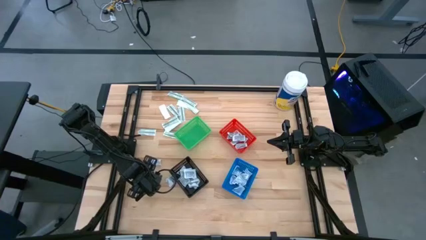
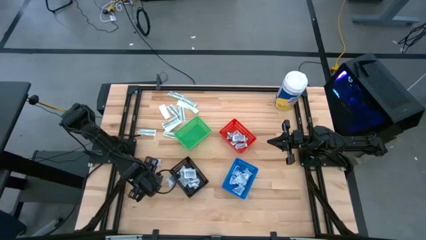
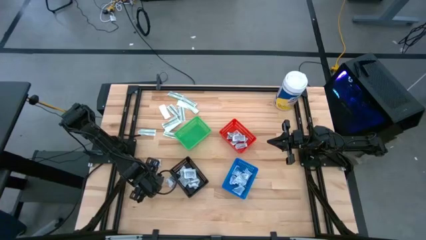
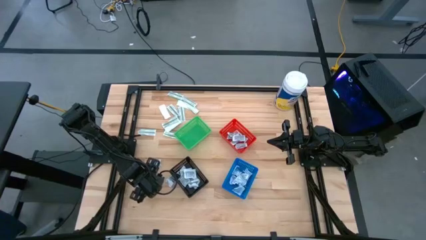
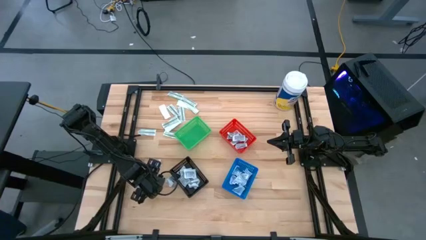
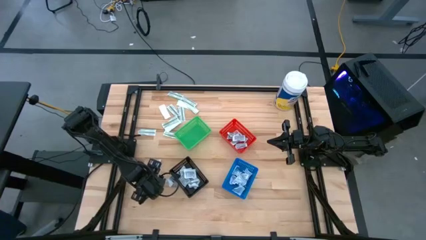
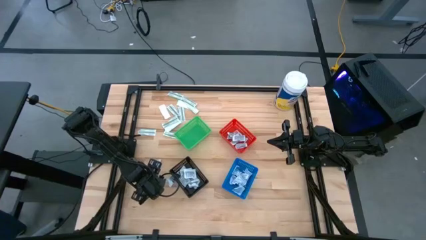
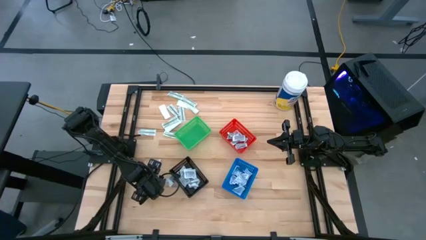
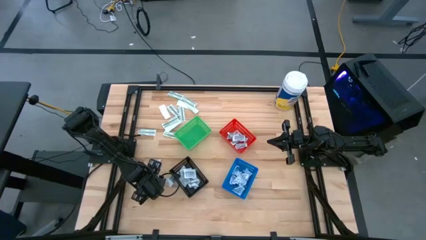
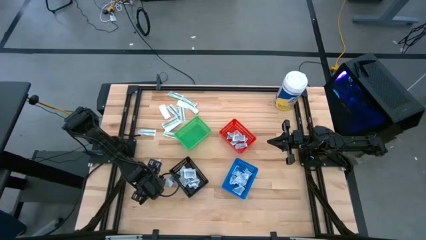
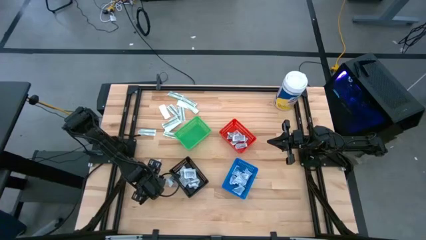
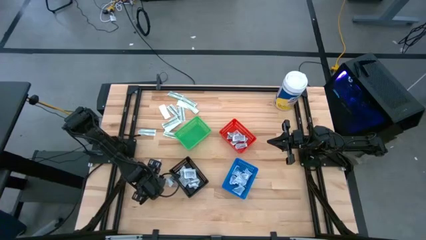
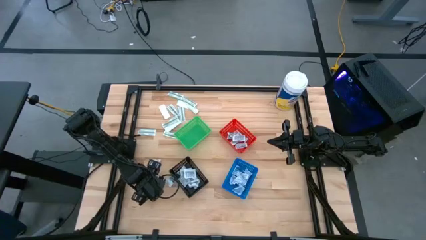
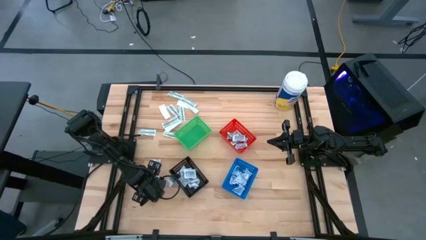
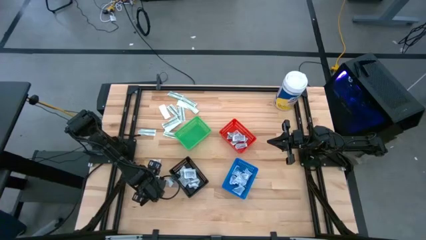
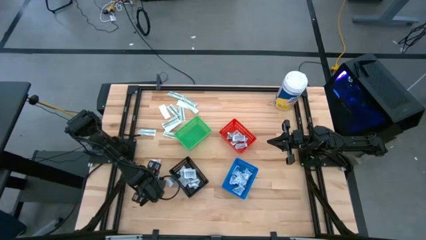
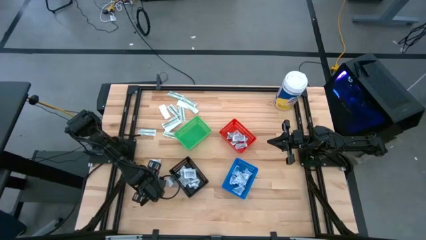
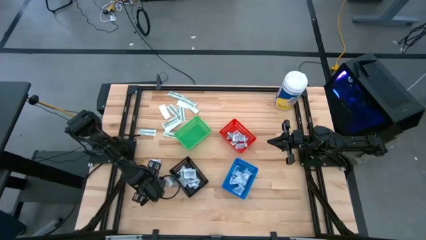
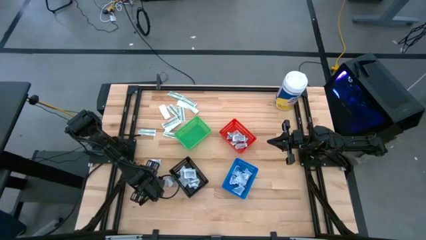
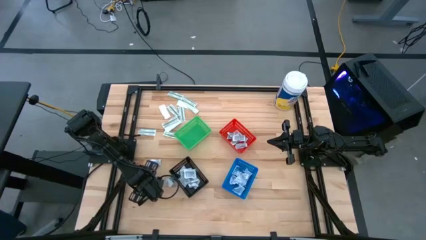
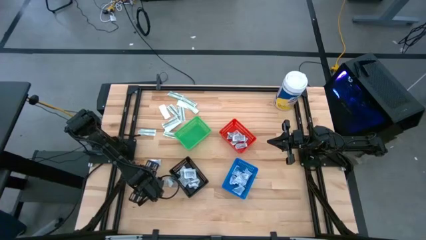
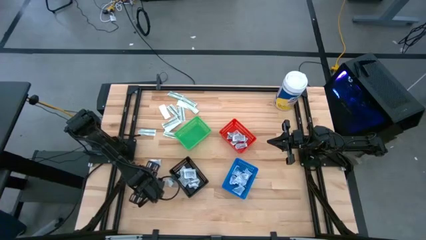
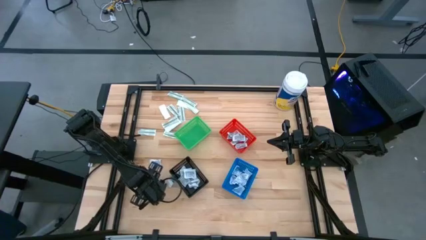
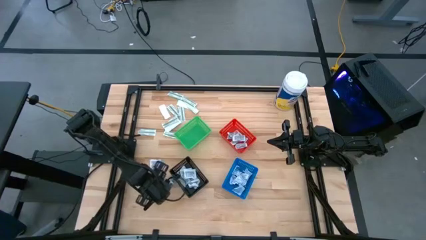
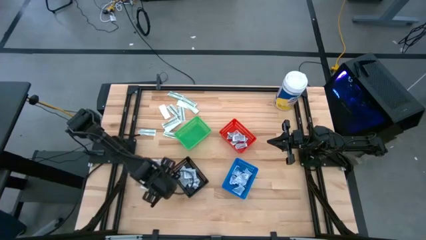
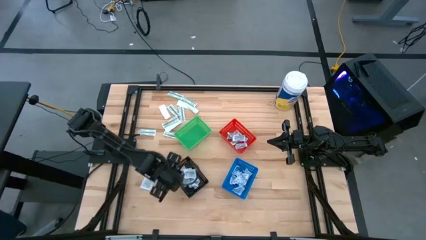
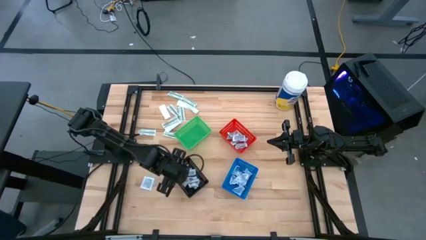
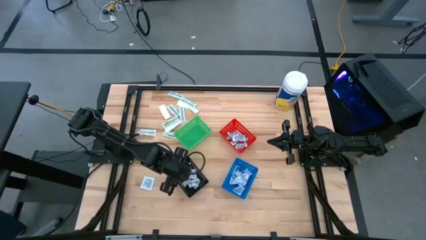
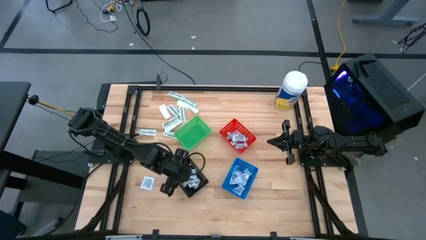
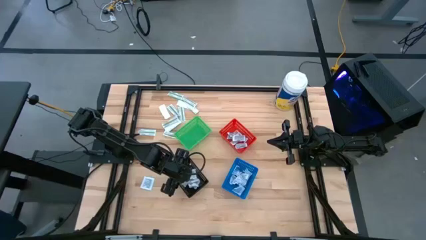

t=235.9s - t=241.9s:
Task: Pick & Place First Aid Supplies
Put the black towelette pack into the black bin

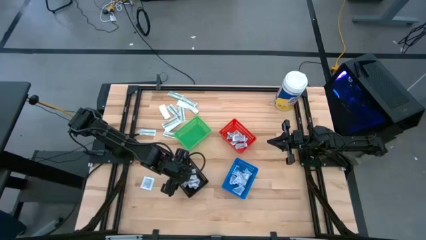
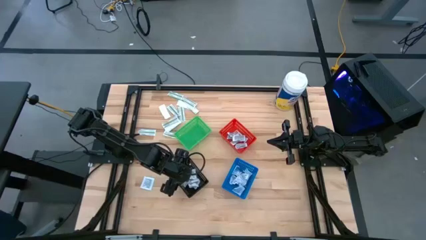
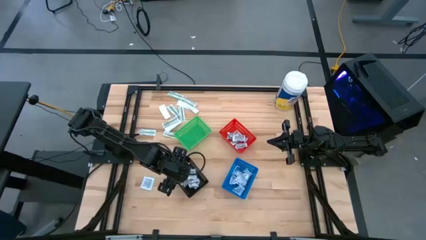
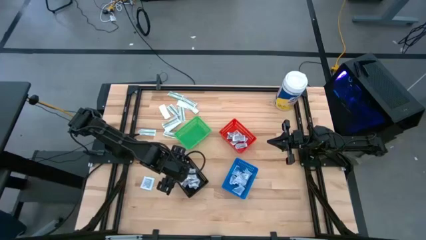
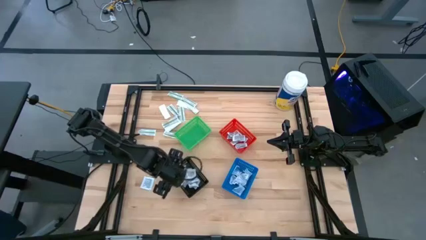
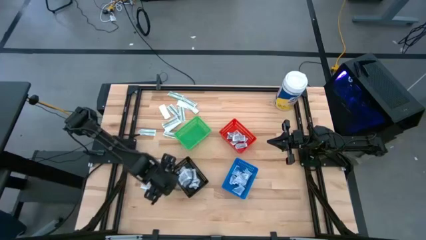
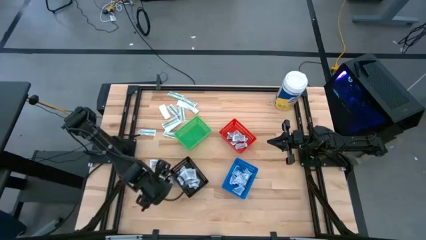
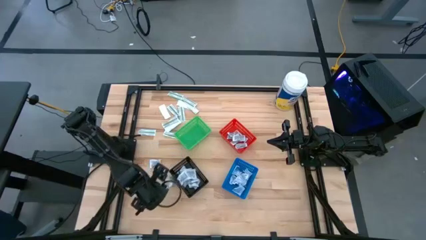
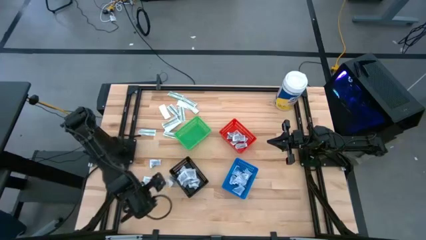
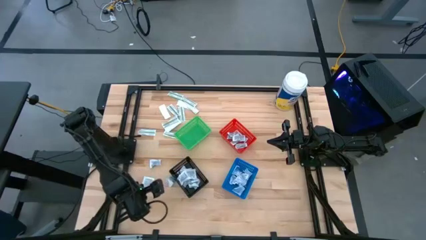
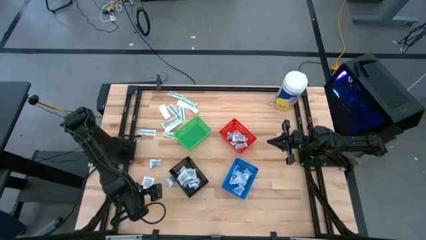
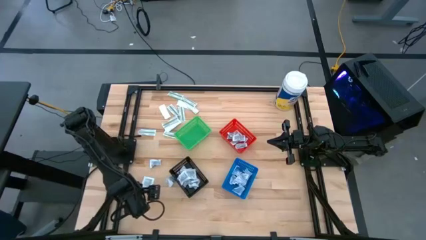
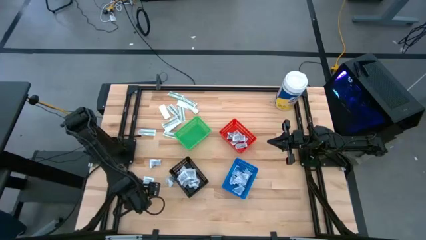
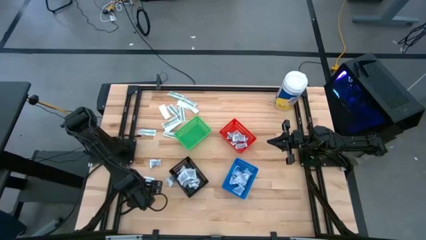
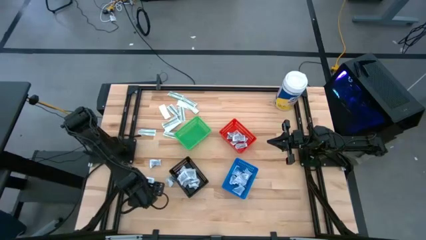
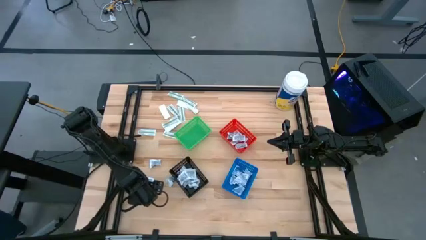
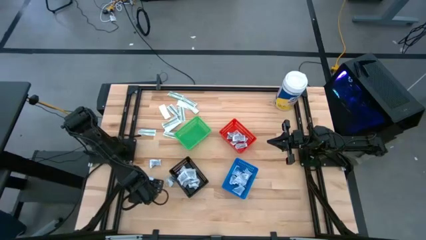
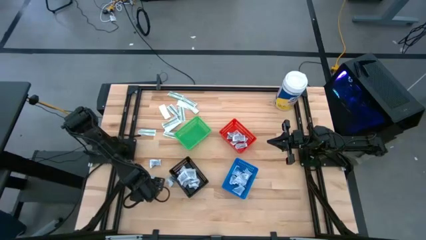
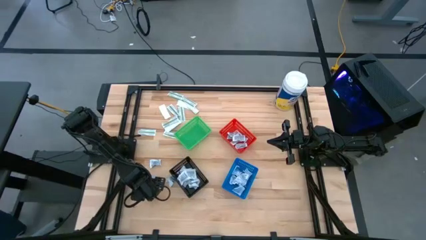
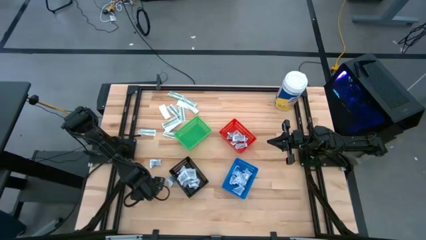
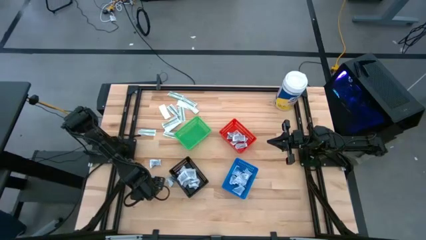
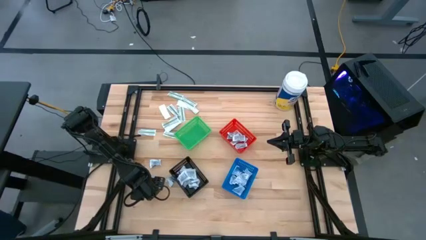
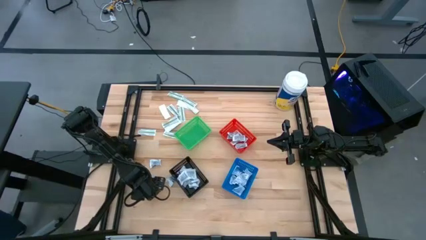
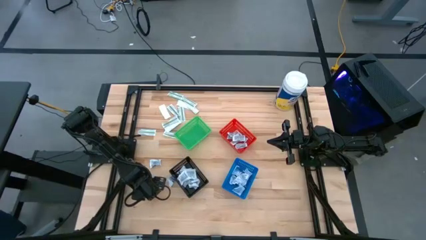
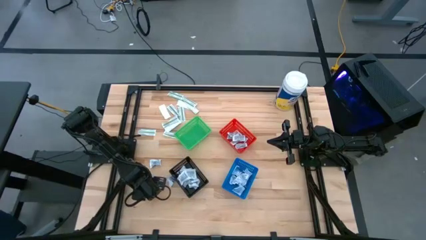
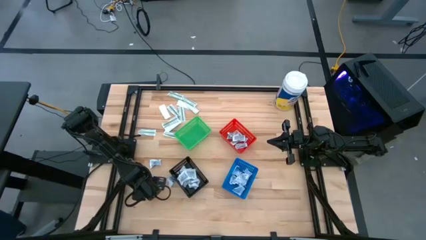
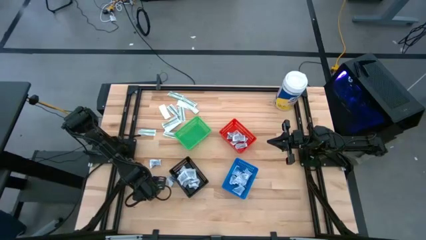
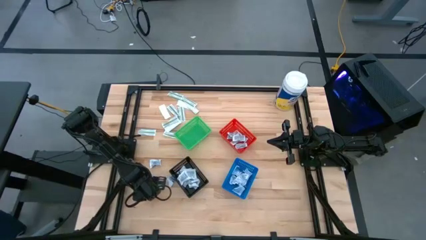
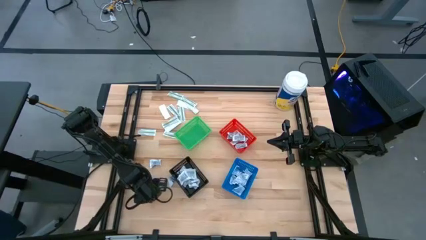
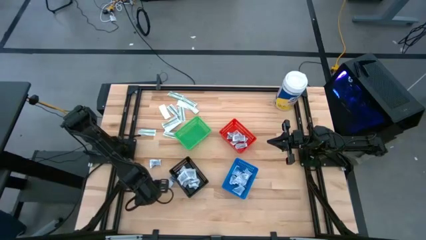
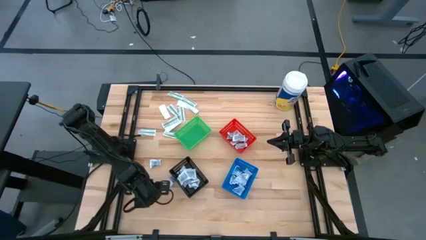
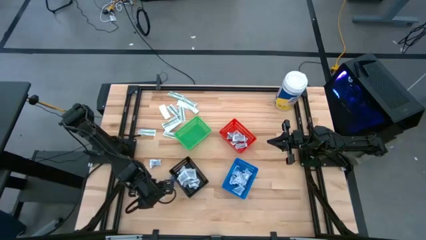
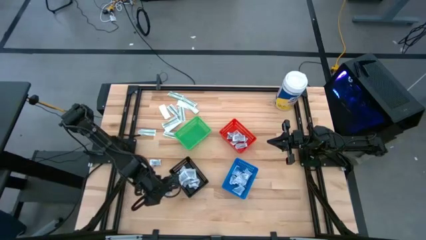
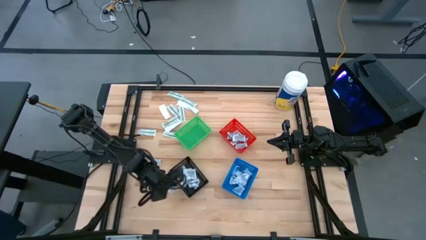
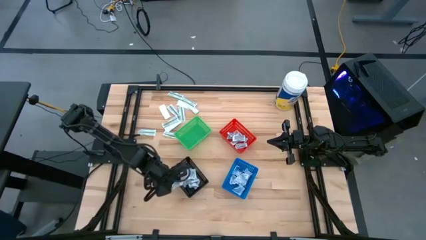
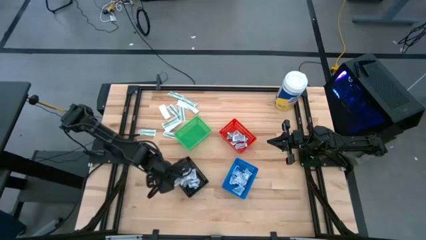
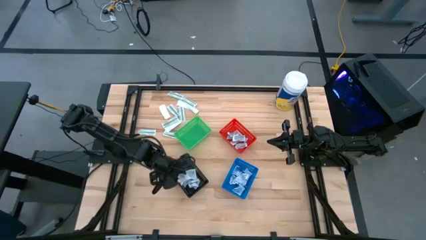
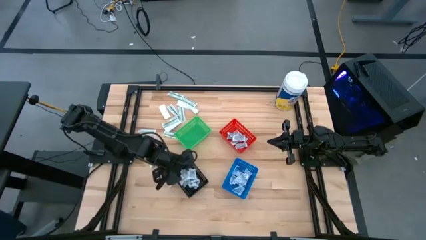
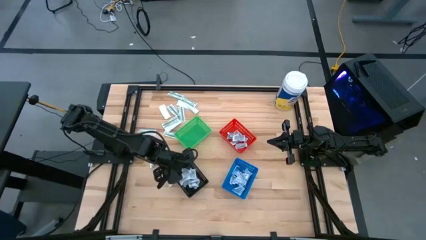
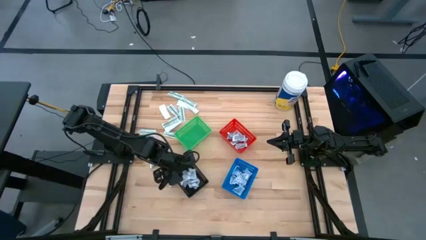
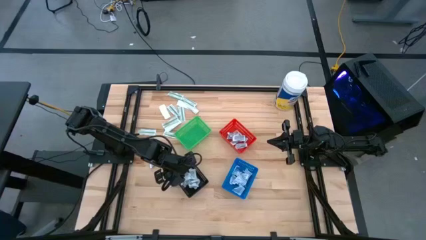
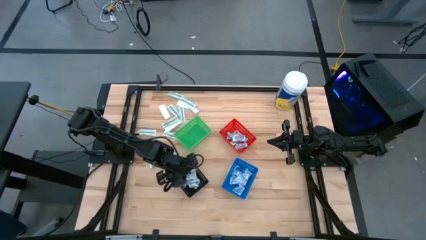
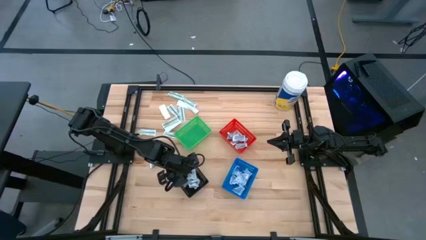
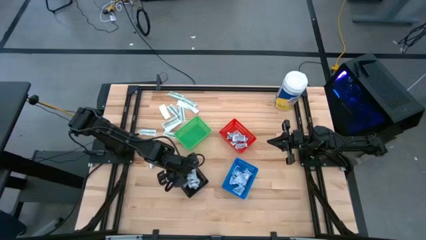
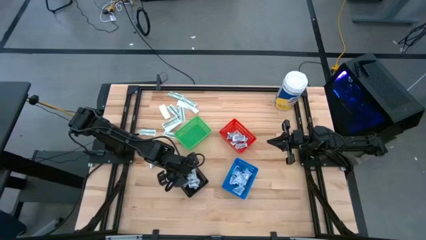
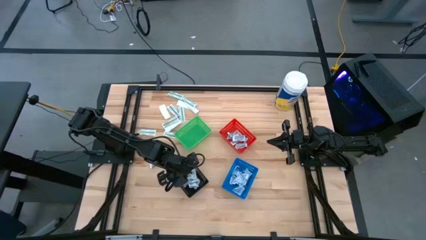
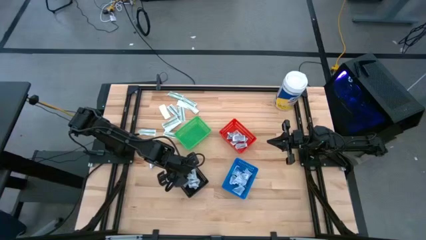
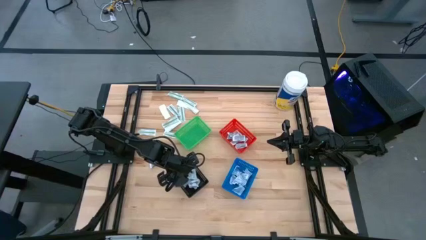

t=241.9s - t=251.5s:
Put the black towelette pack into the black bin
